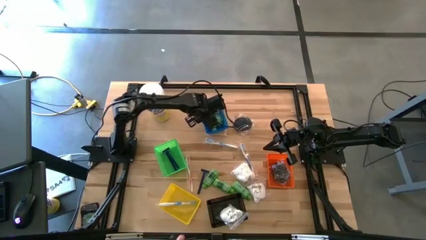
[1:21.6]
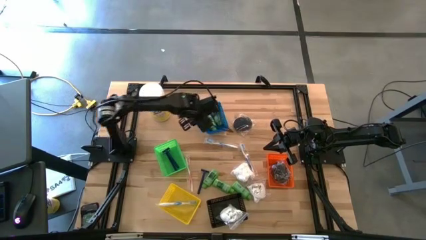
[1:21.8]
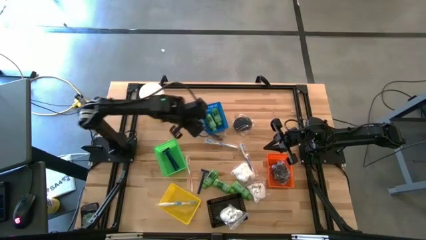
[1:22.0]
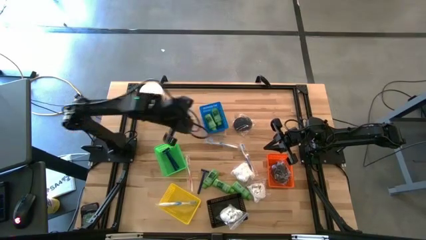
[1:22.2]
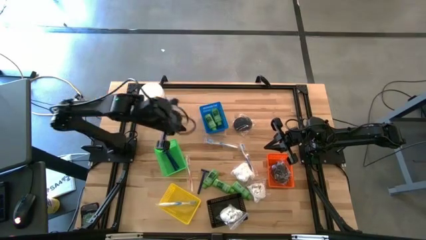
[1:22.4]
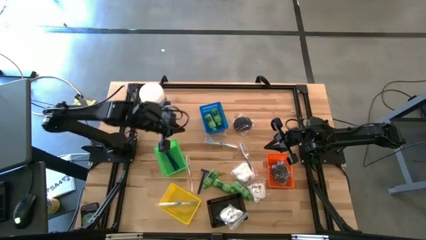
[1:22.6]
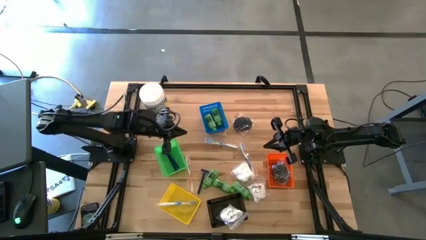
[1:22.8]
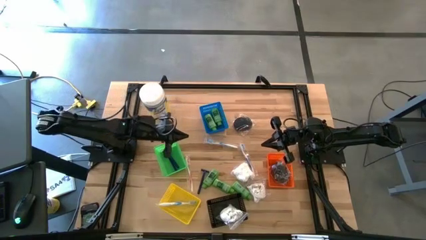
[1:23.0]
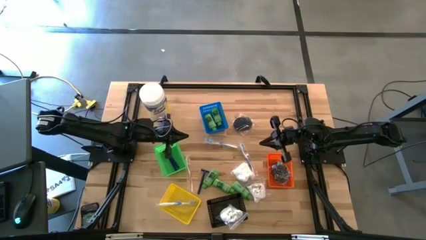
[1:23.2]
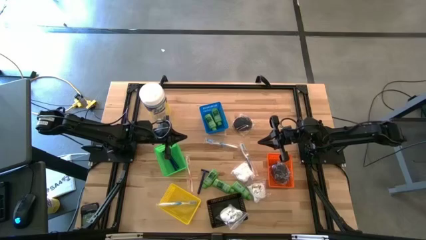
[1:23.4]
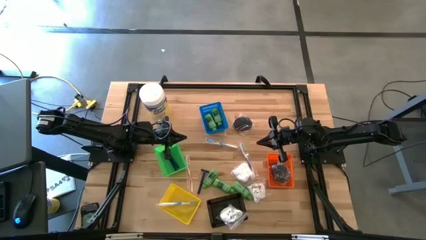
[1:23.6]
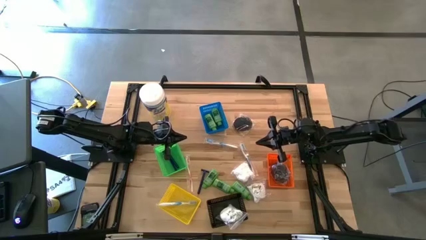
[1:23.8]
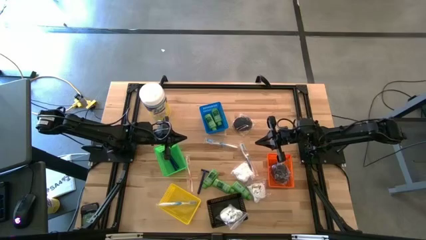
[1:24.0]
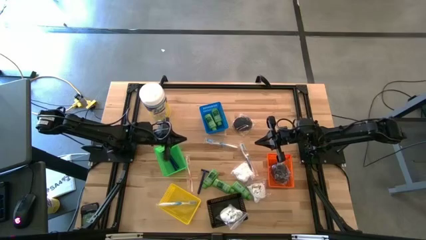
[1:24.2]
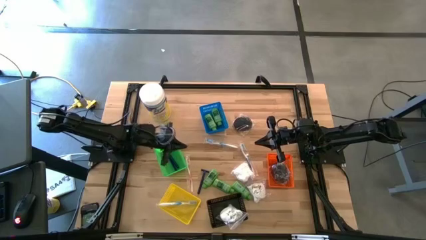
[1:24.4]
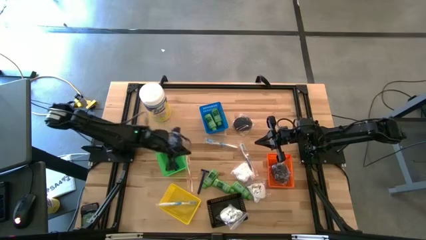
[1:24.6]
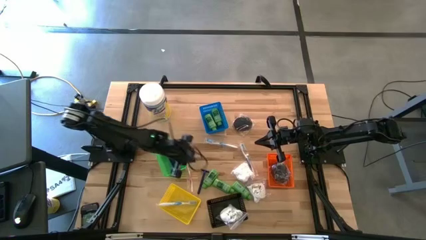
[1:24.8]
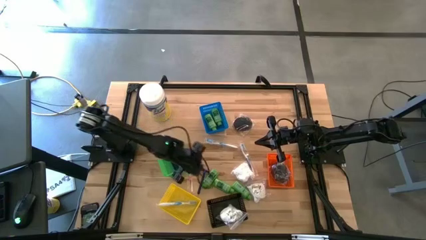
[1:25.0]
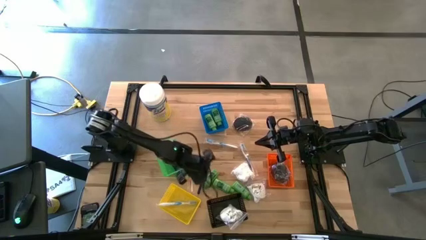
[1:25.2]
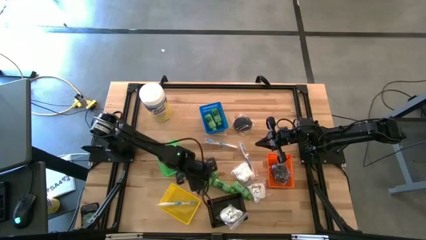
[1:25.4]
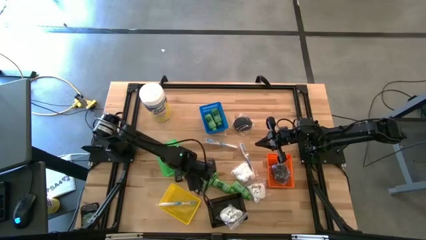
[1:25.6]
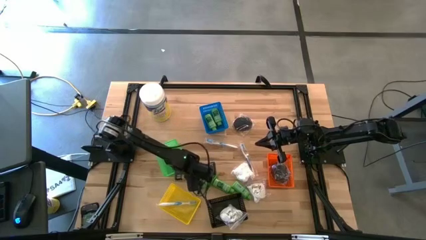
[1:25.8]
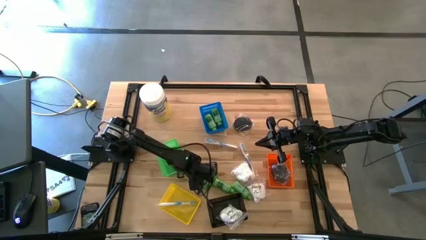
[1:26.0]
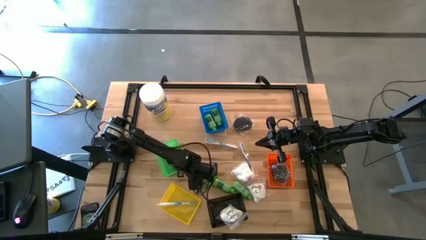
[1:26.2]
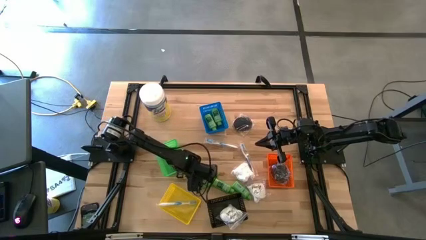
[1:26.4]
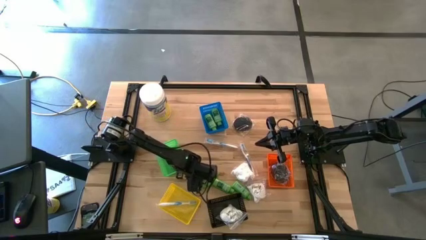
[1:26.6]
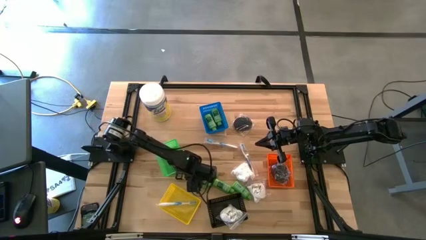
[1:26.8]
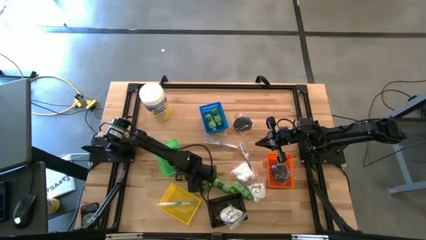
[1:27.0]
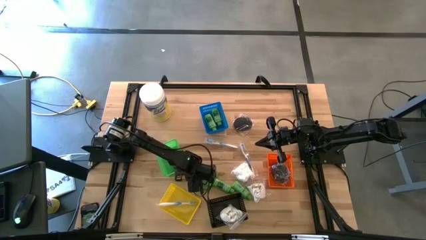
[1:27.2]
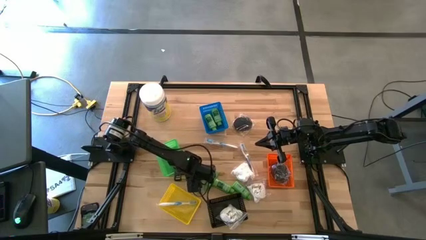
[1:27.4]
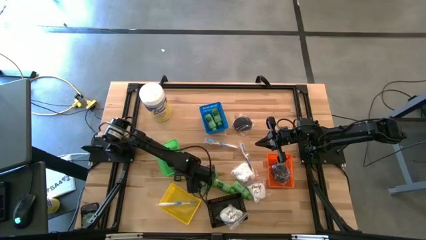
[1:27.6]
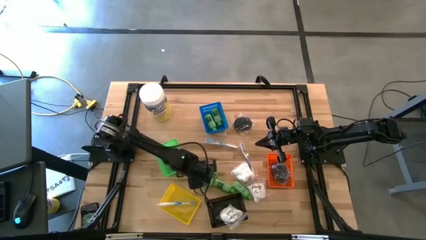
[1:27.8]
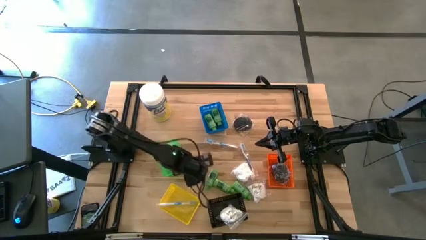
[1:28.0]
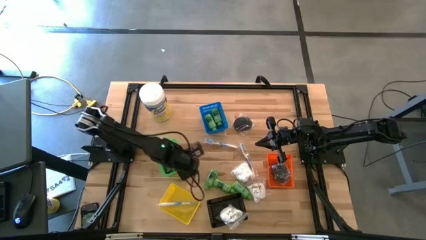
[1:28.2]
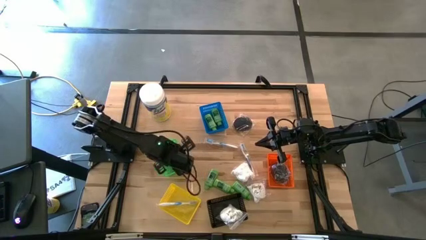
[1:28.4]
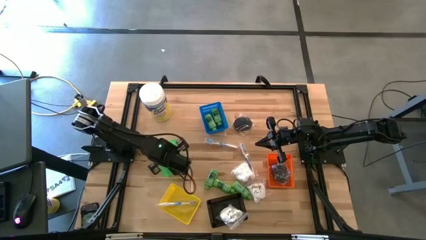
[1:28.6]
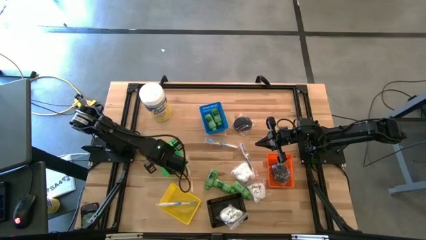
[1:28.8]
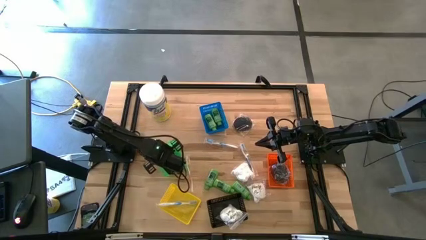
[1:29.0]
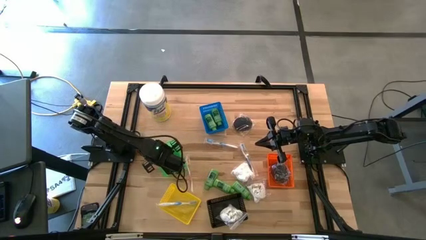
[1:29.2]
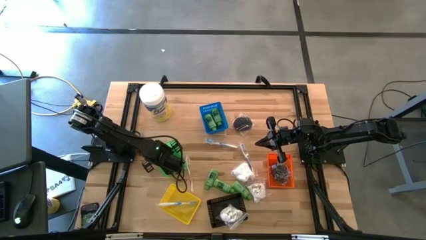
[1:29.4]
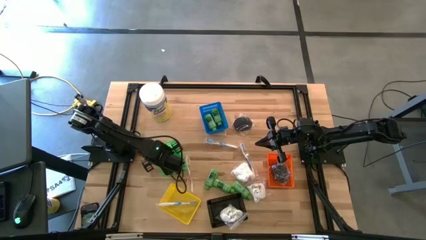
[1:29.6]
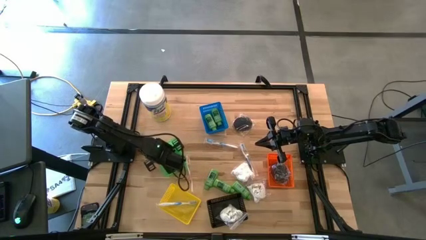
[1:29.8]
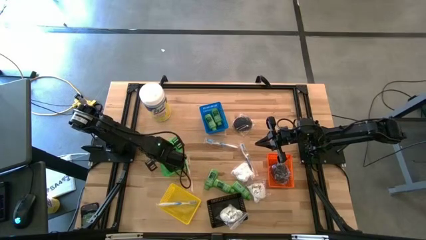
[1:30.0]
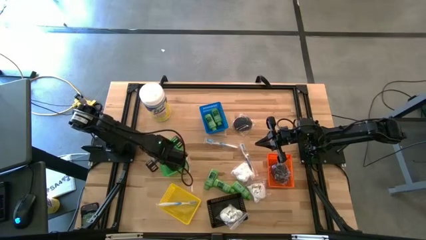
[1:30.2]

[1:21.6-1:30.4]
Task: Pick & Place Travel size toiletries
Put the razor into the green bin

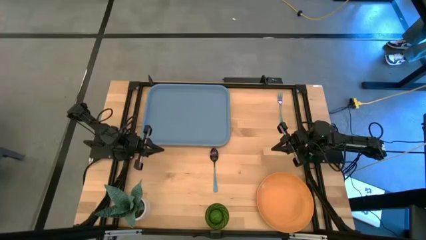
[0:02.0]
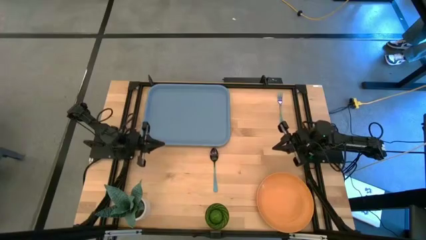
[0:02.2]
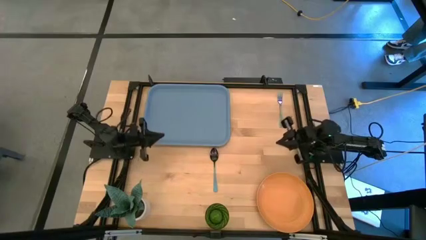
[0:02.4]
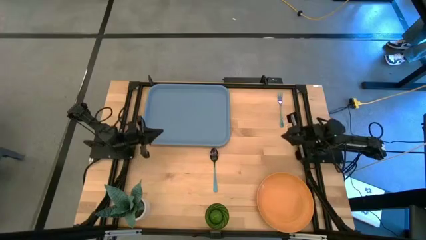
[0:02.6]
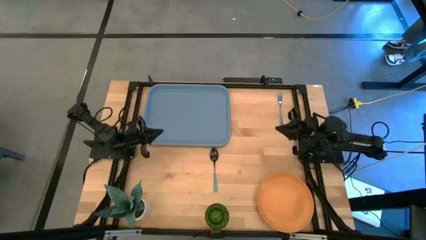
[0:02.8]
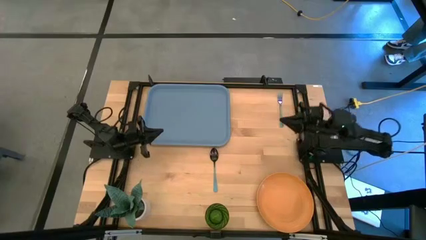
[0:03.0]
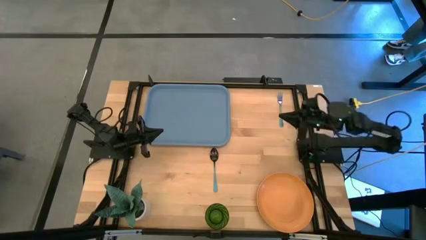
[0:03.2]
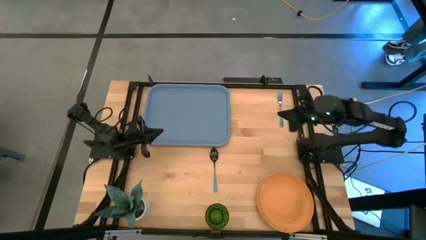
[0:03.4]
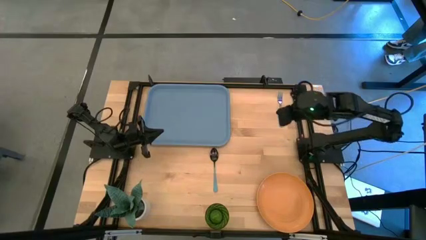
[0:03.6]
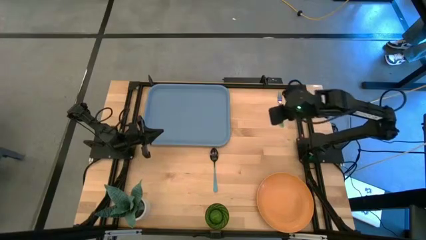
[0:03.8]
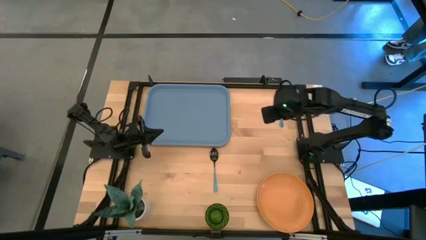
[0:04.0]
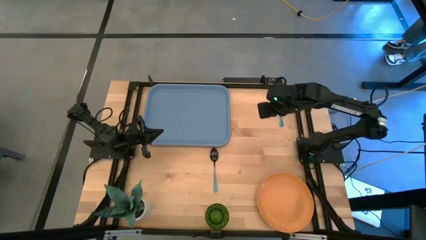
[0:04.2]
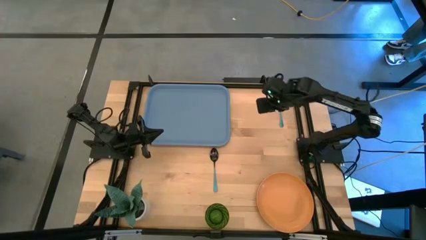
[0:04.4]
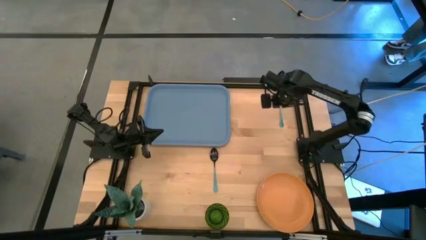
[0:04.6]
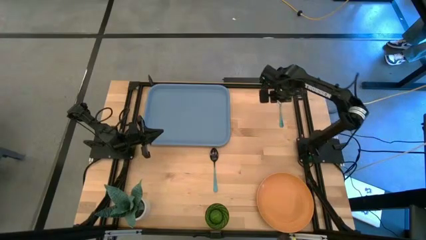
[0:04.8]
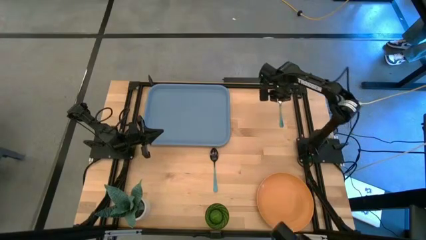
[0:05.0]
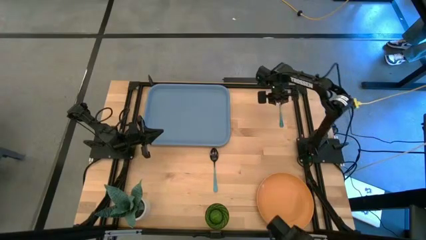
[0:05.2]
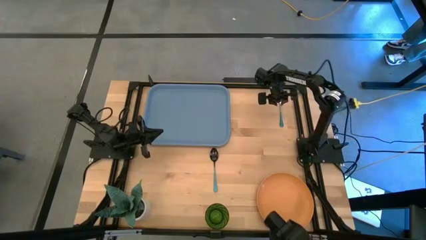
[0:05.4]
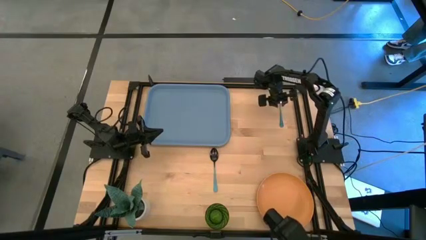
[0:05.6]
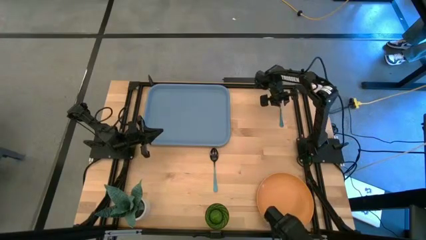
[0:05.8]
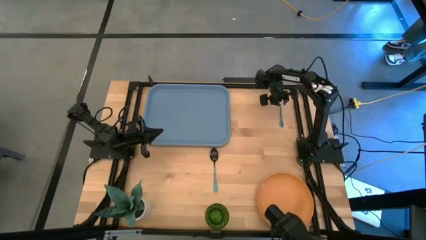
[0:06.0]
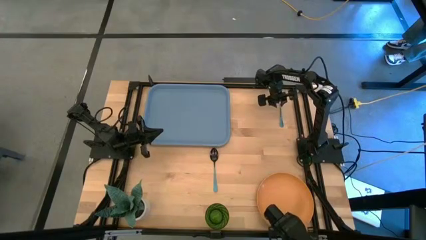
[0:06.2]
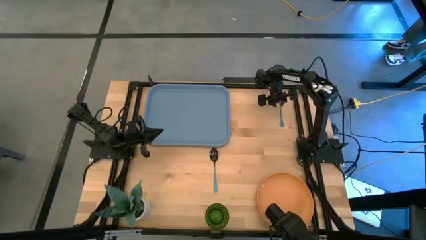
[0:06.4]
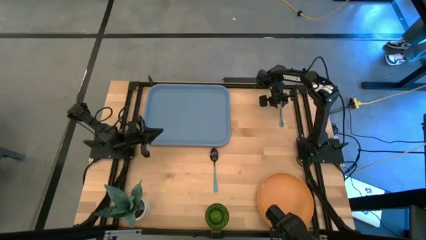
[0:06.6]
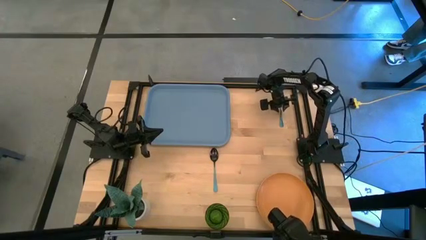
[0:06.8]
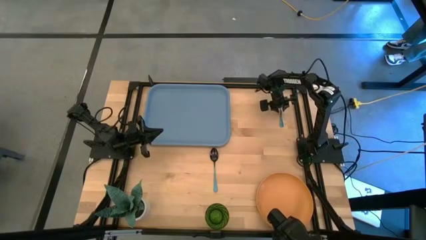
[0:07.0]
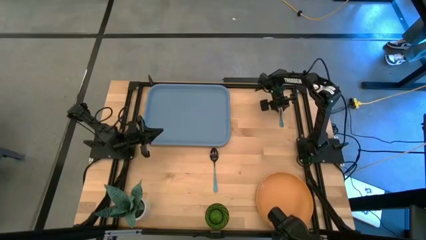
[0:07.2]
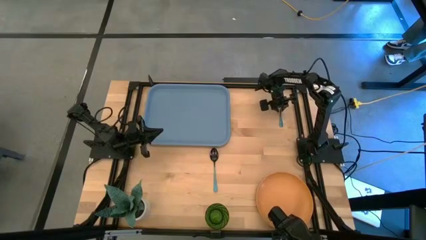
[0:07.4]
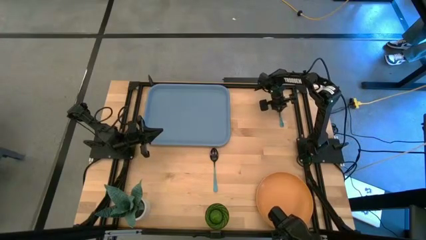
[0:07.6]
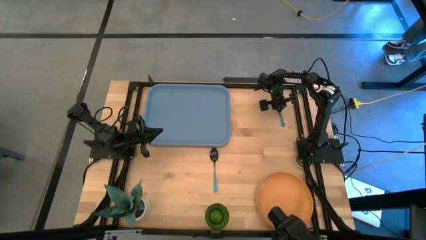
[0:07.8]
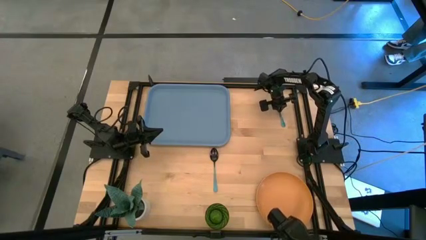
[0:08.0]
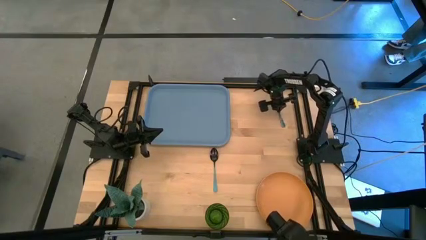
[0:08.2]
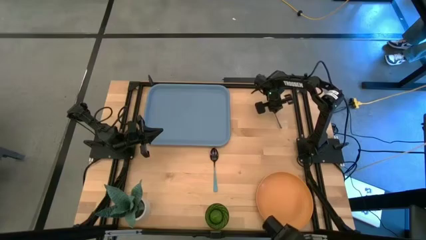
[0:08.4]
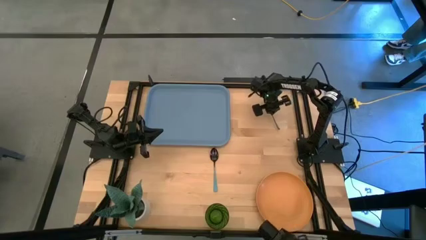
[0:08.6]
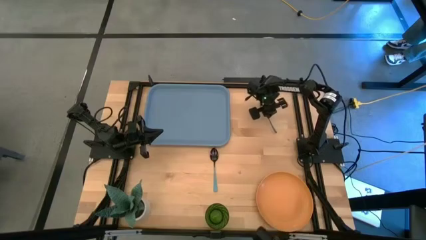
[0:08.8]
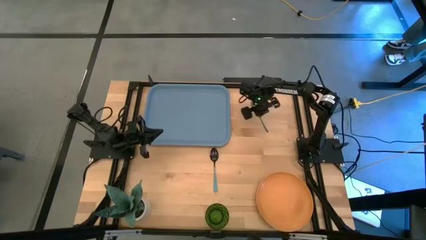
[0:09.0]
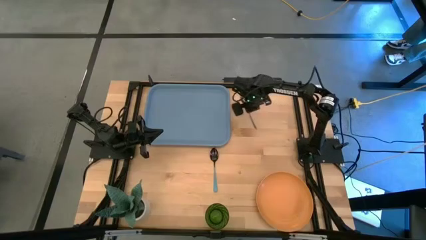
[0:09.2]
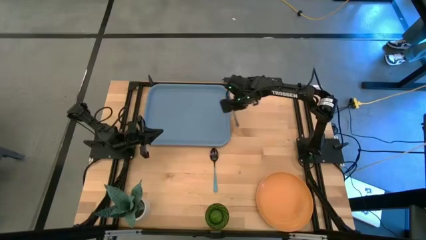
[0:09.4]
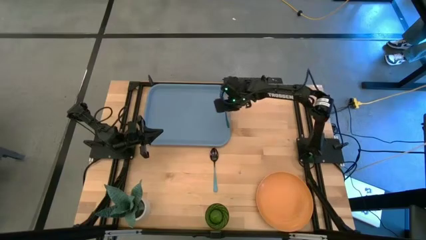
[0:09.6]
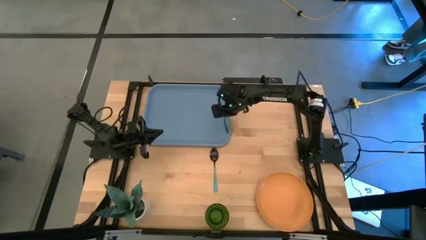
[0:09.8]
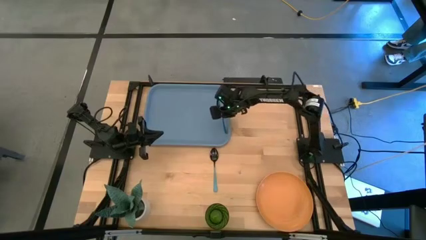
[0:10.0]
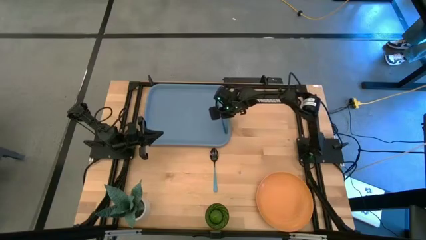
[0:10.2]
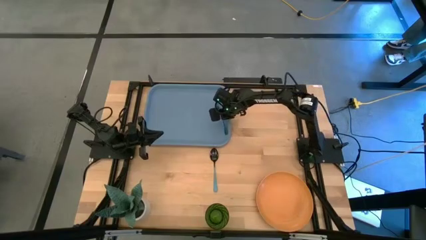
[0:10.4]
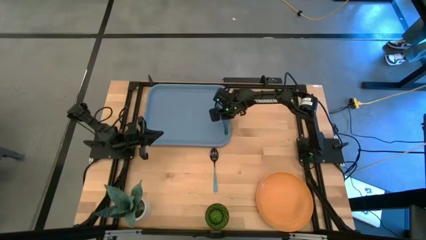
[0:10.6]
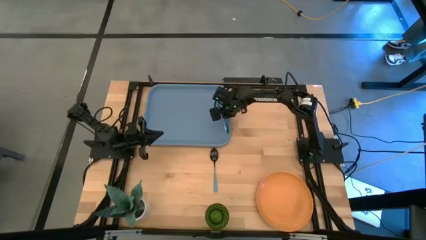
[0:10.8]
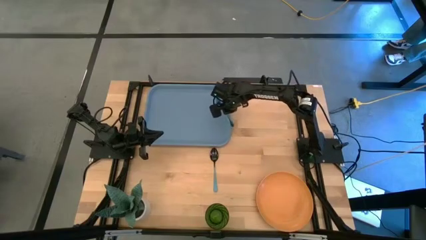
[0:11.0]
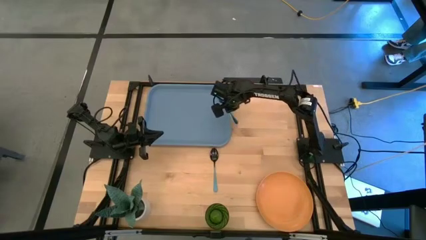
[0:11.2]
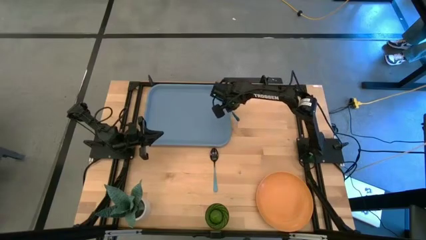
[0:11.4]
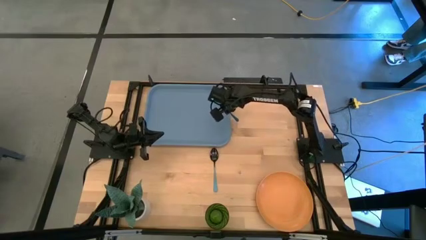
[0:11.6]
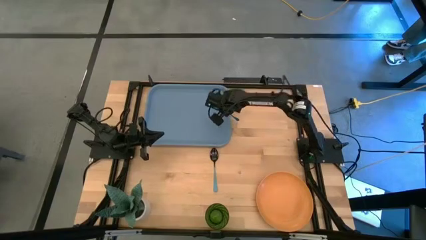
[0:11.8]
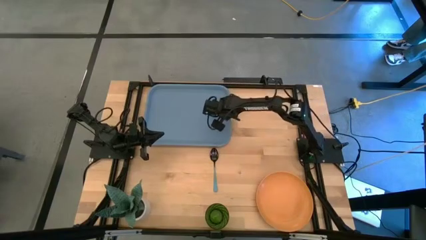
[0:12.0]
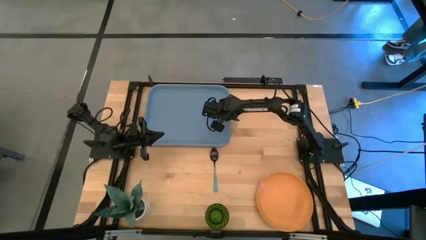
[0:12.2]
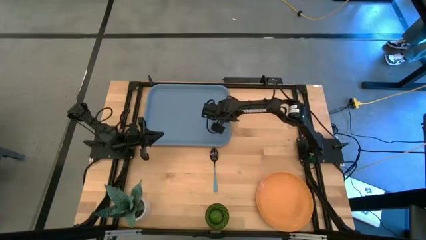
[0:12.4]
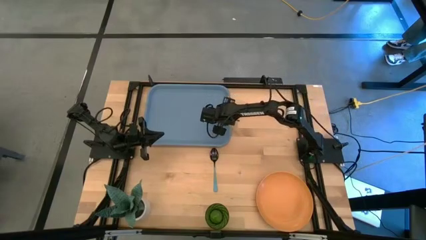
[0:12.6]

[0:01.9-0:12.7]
Task: Pick and place plate/cup/fork/spoon on tray
Put the blue fork on the blue tray
